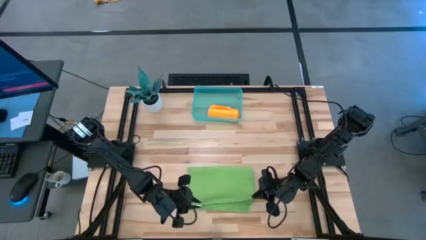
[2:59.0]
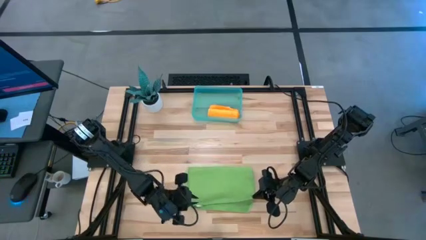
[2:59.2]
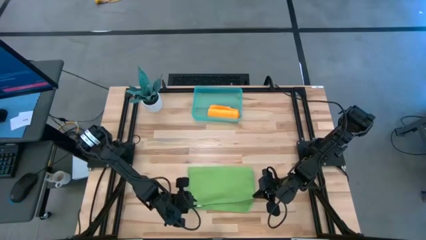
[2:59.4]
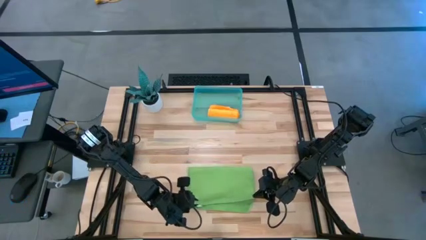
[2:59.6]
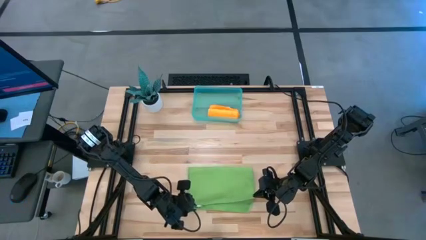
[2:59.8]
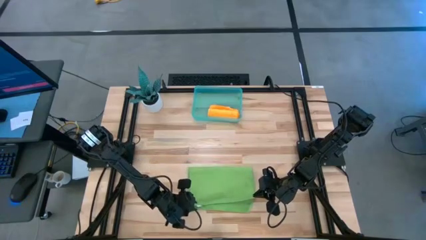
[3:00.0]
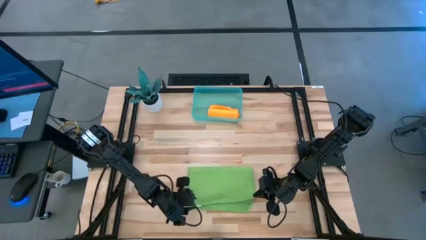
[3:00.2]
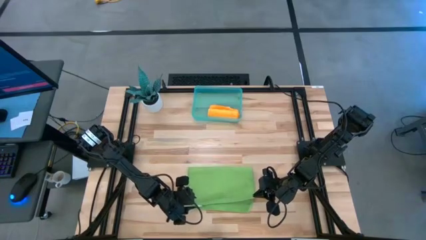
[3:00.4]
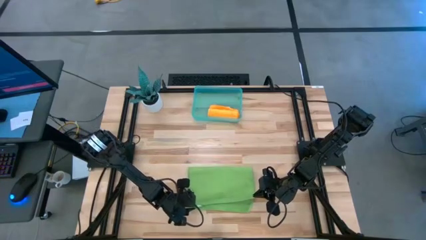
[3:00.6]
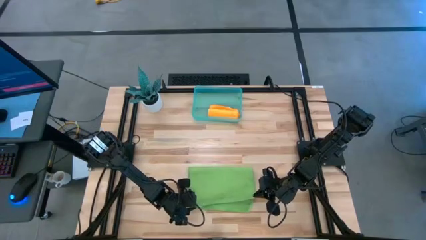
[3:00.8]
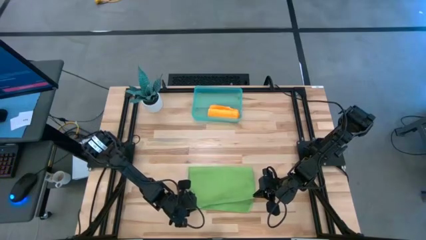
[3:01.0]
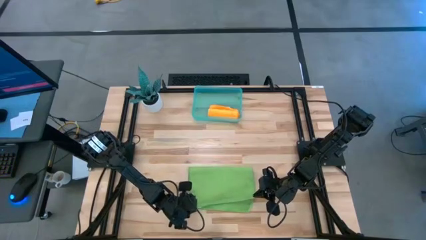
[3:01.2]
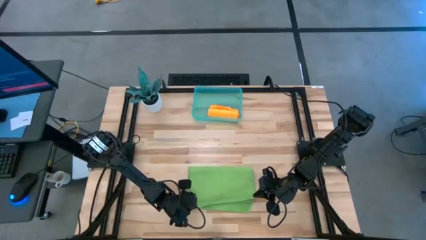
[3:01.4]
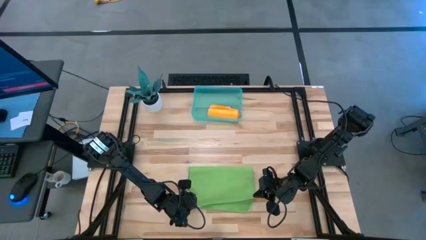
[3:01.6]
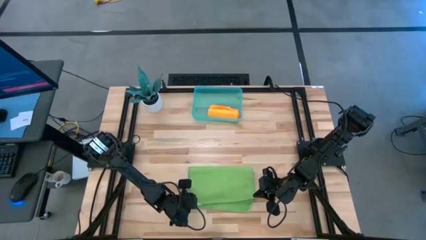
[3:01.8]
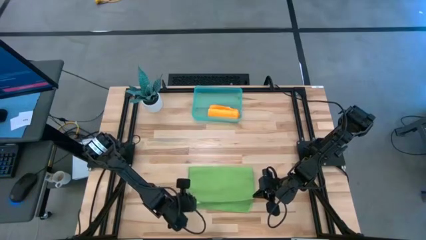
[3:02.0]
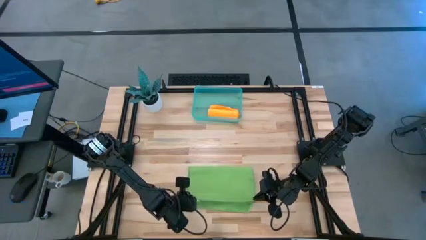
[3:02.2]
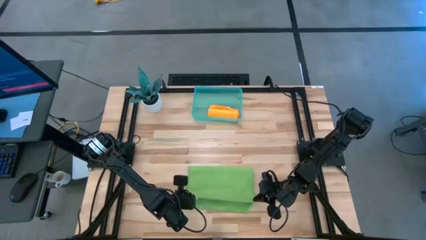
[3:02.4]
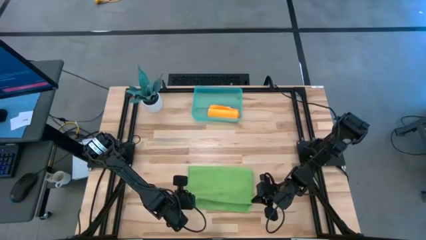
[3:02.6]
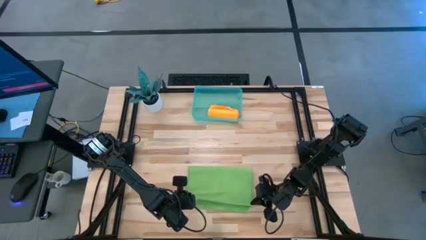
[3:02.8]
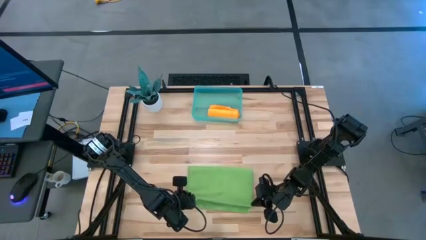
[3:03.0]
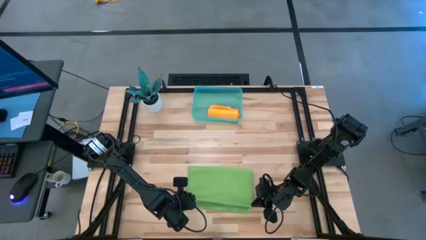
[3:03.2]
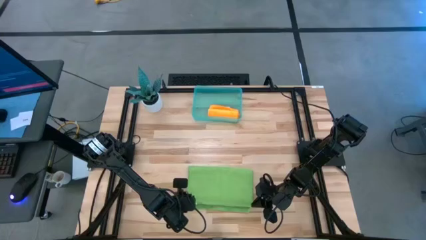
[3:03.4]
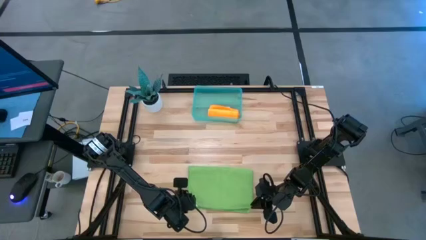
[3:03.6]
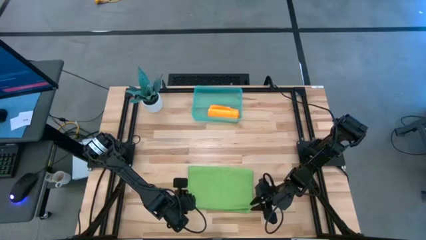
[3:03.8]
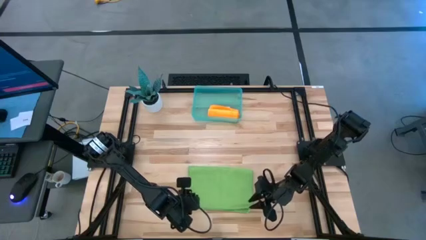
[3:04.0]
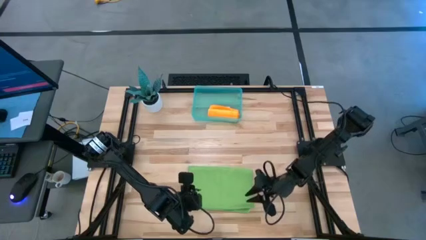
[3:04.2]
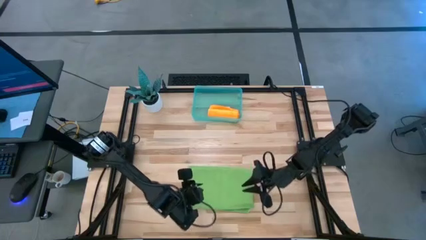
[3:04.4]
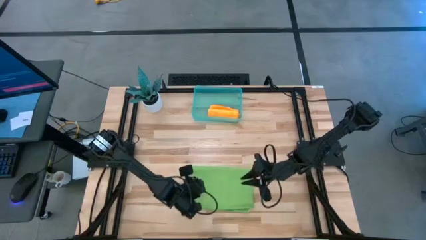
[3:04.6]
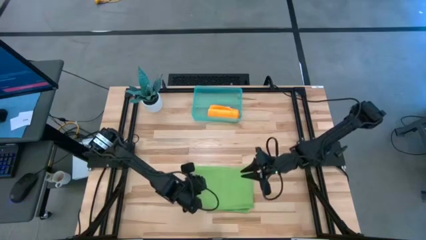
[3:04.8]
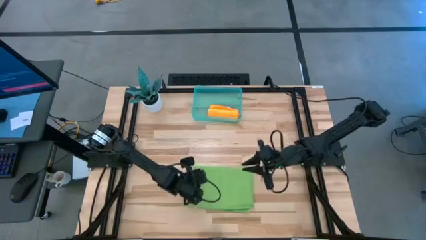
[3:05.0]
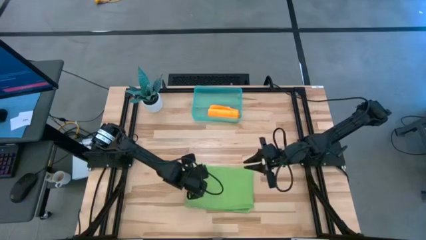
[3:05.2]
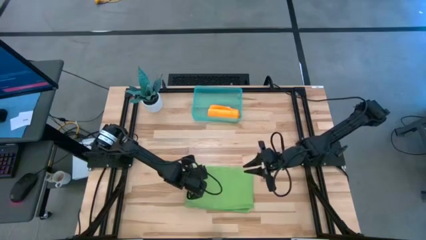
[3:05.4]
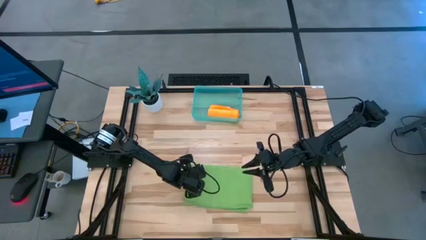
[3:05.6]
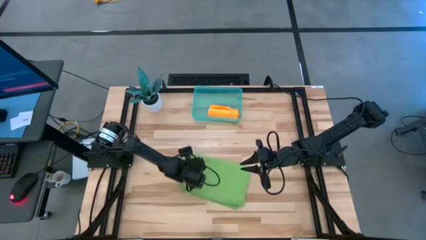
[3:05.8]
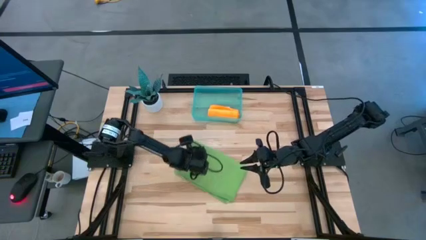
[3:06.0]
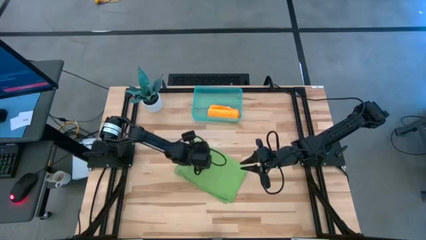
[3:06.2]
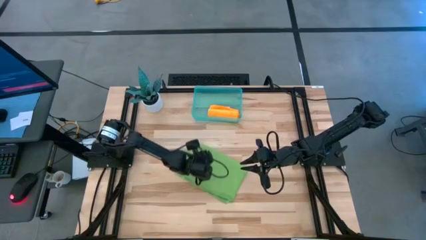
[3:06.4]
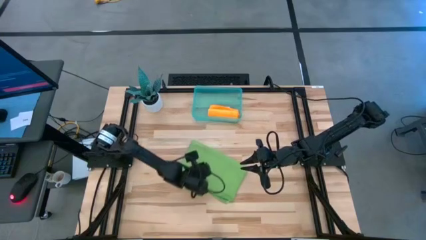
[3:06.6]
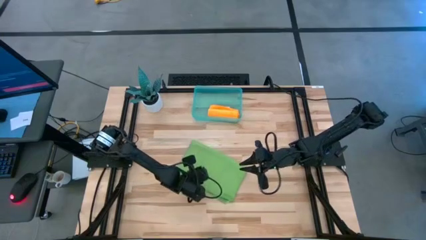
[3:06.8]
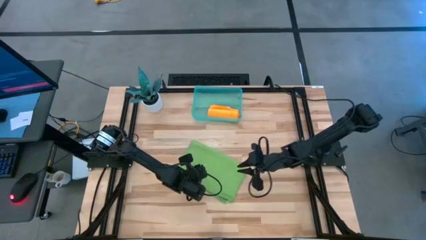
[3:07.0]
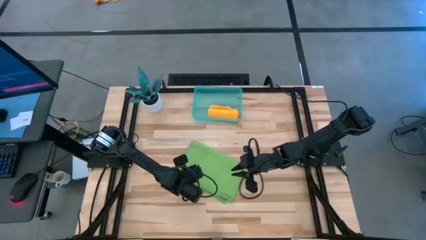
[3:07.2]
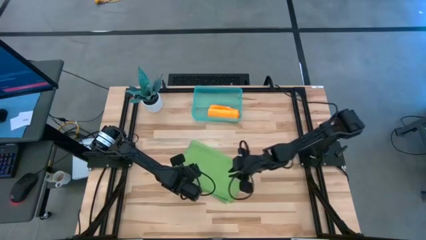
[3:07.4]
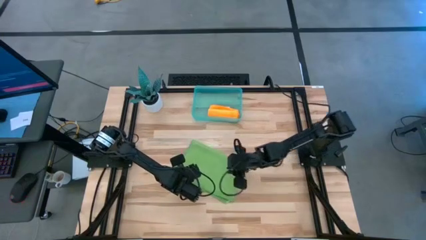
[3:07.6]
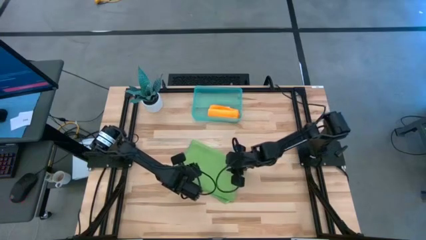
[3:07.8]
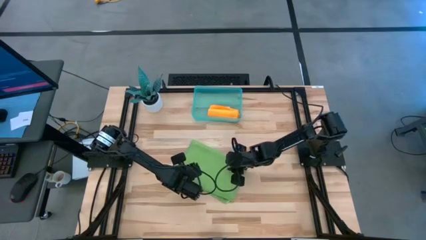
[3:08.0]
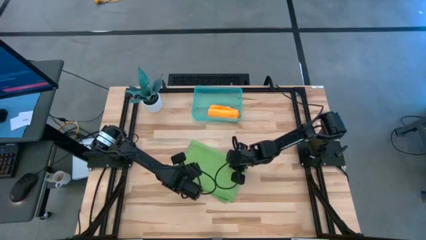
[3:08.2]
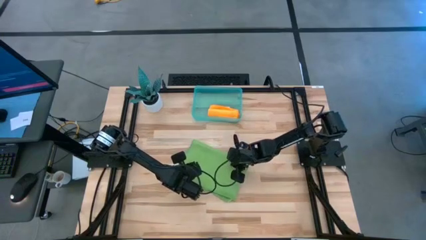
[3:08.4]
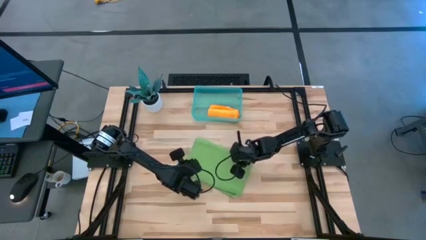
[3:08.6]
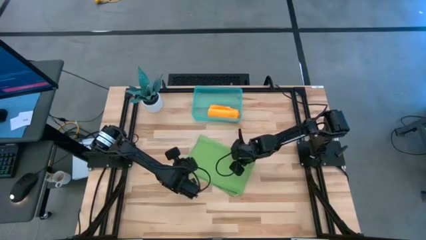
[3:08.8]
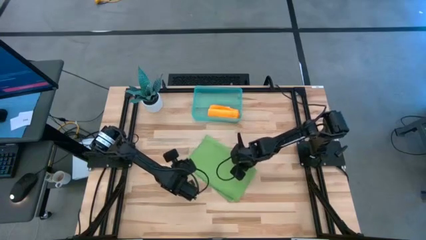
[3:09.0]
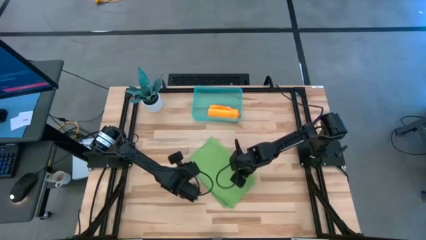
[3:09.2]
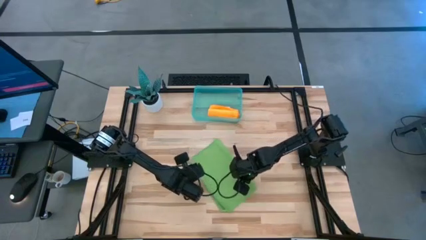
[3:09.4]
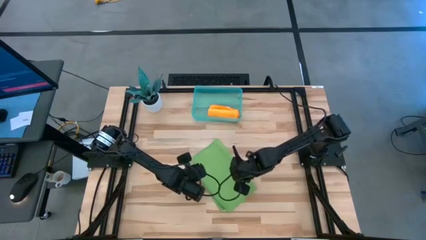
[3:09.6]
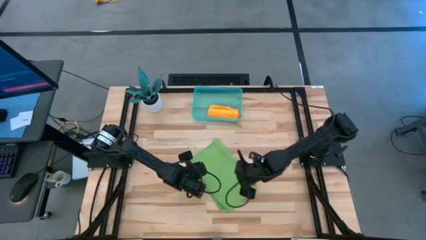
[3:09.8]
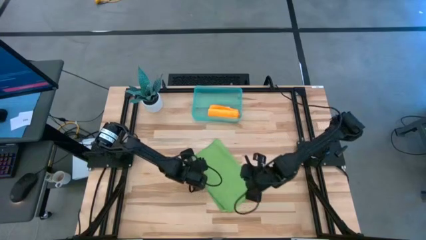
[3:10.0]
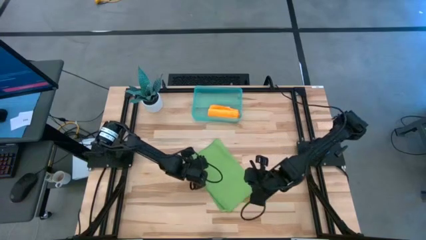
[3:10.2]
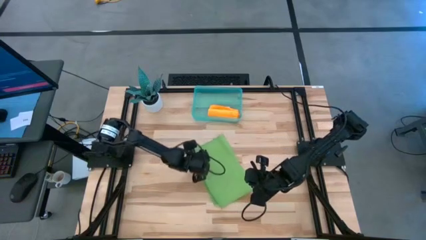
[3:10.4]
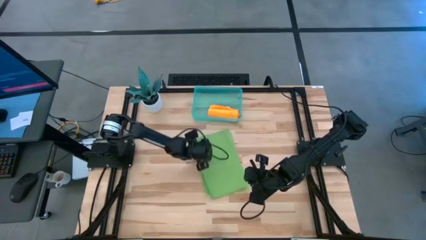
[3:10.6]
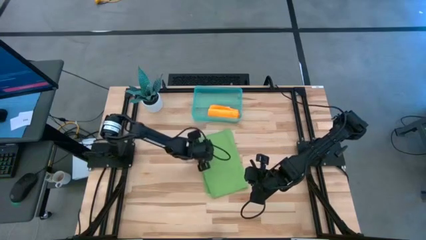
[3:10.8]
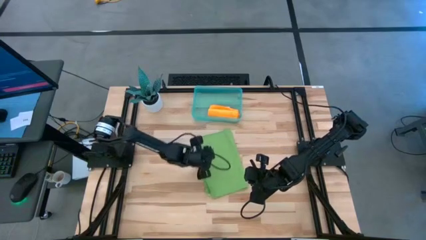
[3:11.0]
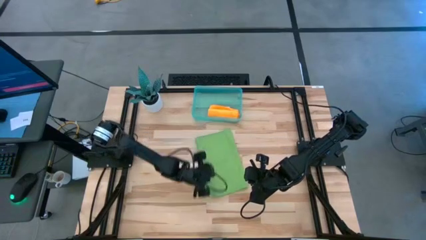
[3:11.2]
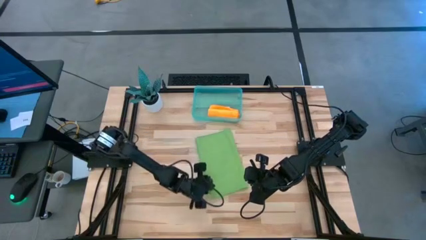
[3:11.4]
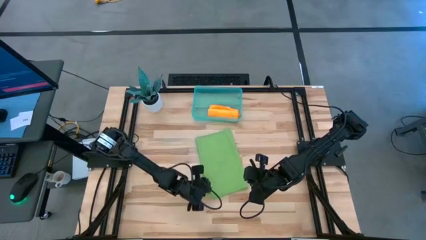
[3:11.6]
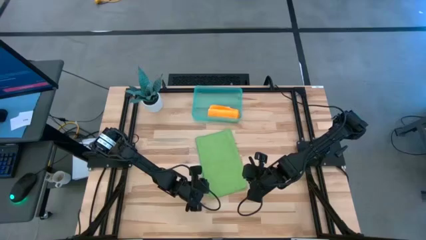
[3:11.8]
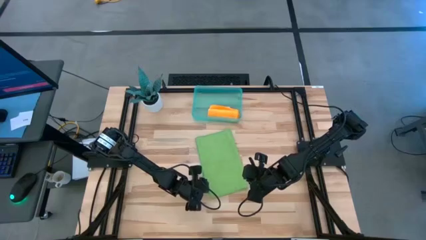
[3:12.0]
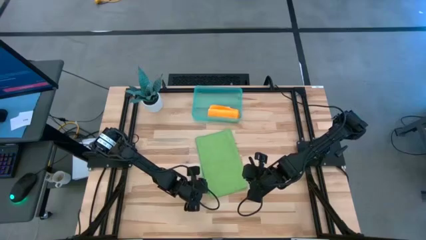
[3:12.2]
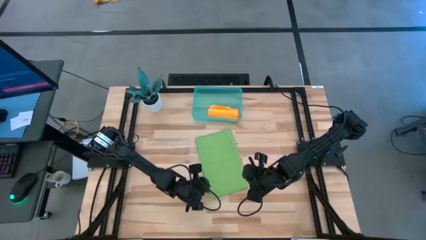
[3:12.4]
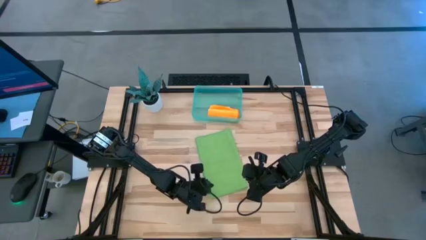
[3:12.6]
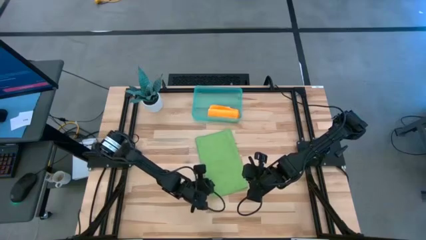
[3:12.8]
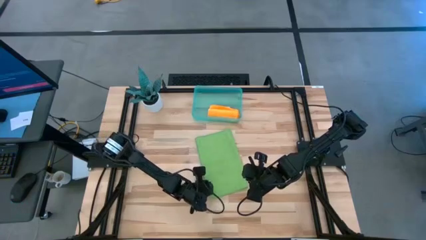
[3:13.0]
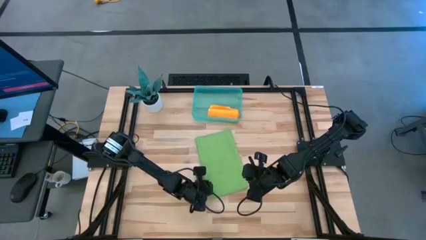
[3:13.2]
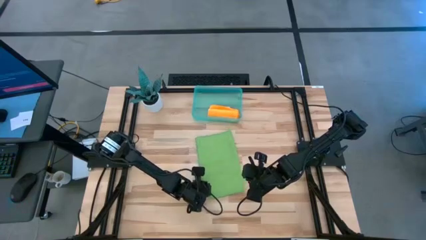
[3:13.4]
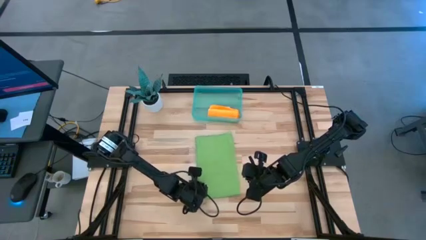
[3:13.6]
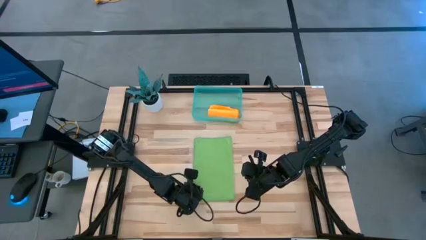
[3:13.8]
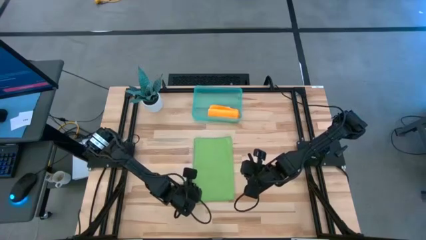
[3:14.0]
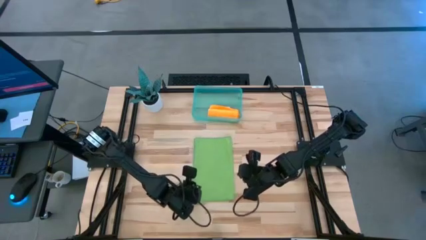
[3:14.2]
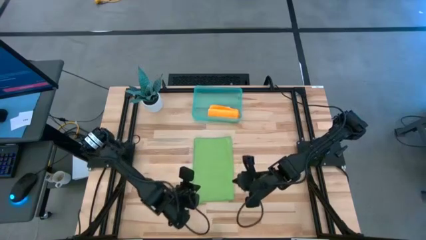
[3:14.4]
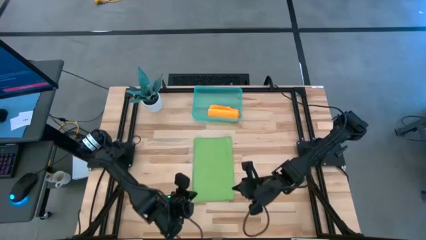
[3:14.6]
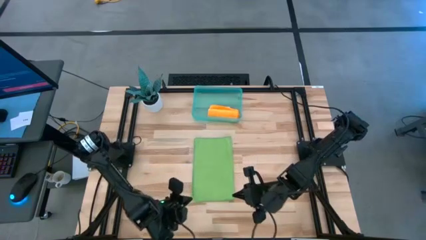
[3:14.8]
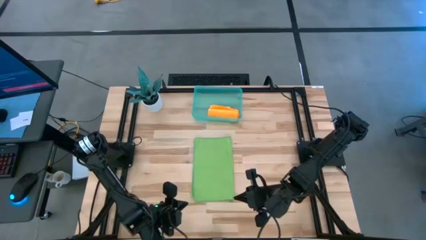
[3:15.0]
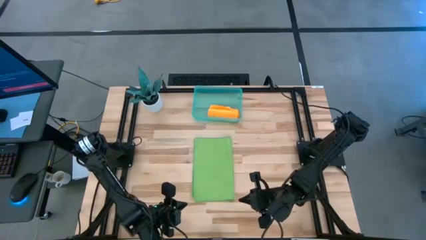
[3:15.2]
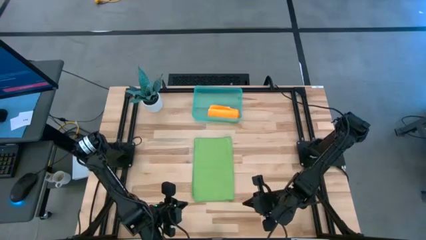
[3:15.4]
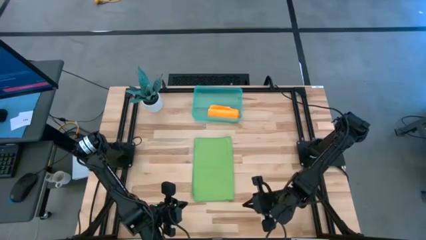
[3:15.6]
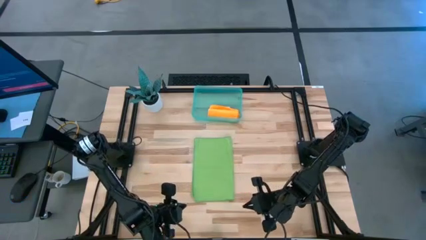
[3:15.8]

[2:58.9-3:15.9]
Task: Roll microfiber towels into tight, uniform cylinder then place into a basket
Roll the green microfiber cloth
